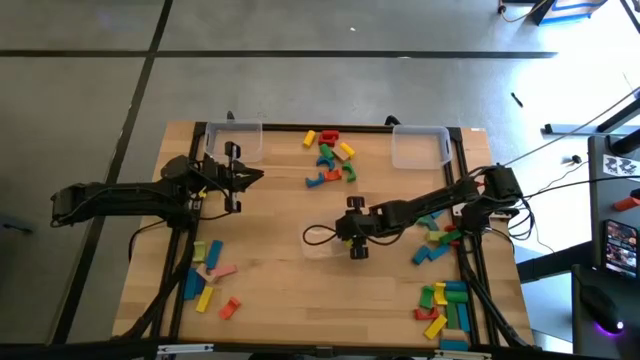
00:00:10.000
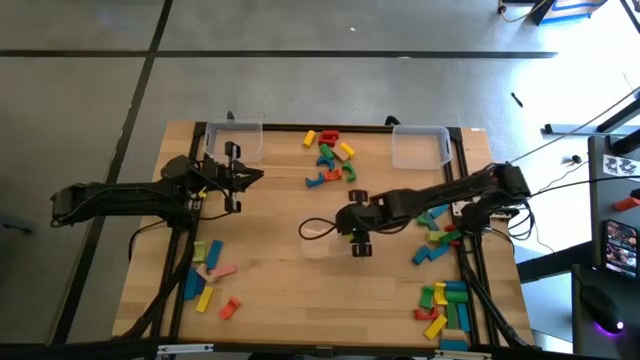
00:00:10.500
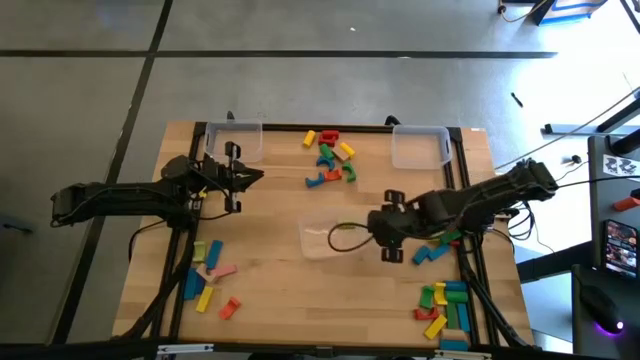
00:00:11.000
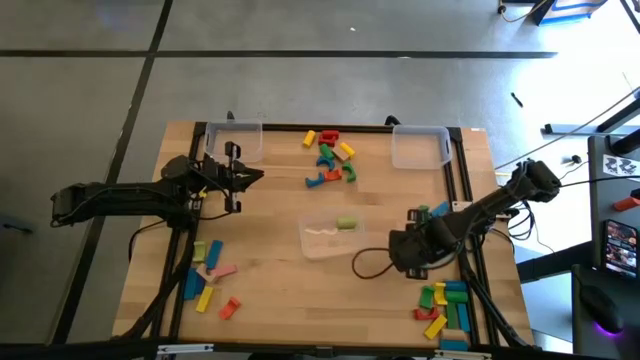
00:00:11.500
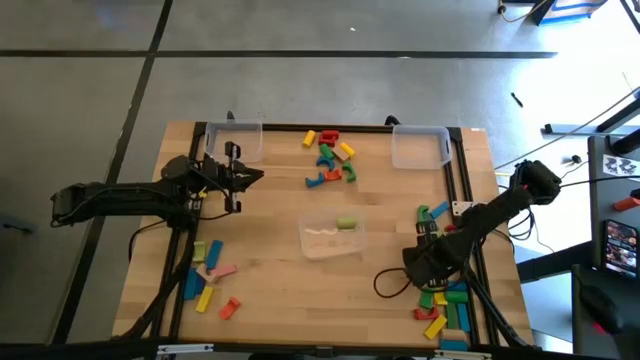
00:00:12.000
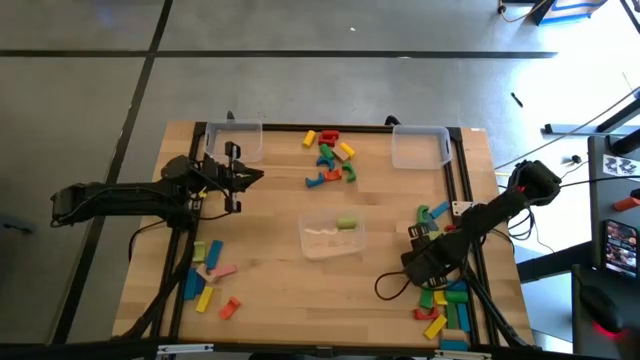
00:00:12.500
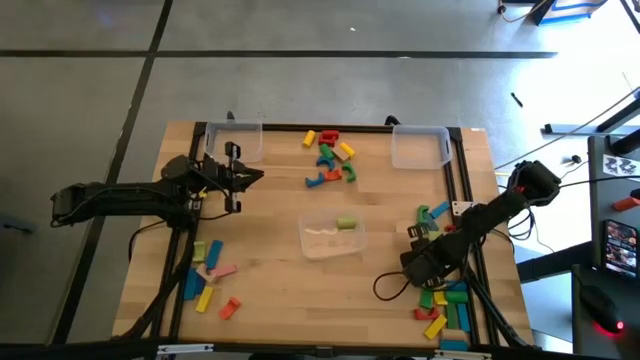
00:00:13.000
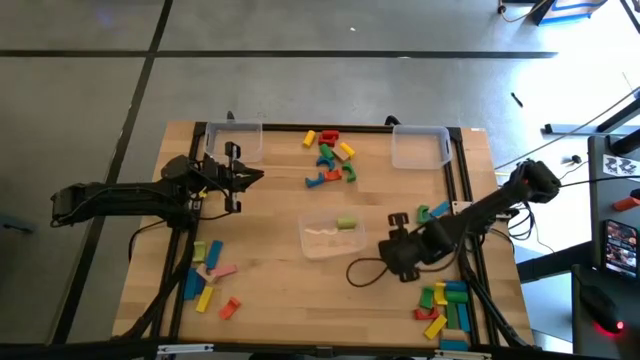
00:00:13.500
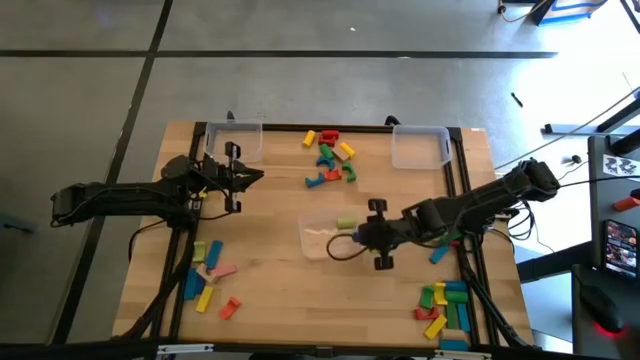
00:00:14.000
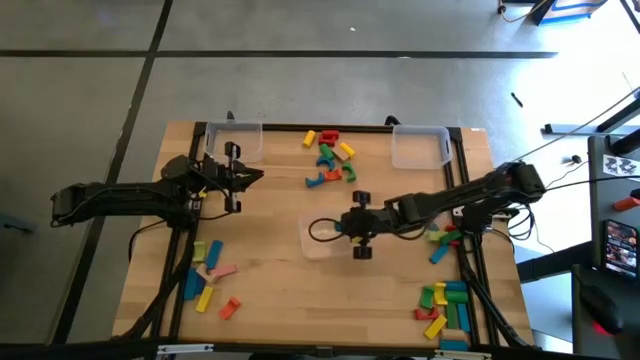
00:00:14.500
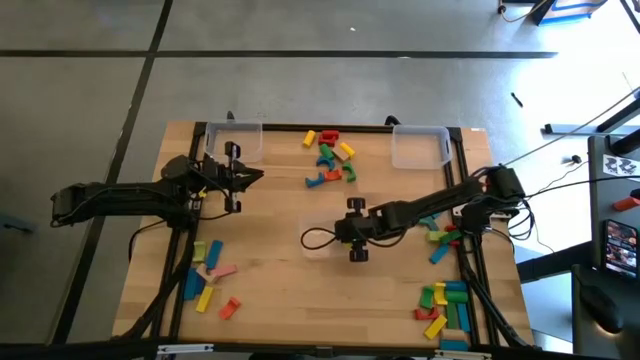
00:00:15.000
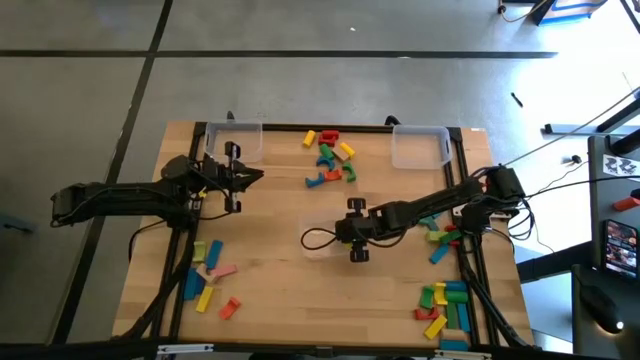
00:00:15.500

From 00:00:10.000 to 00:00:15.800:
Task: Sort blocks by size
Put the blue cylindrical block into the bottom transparent bin

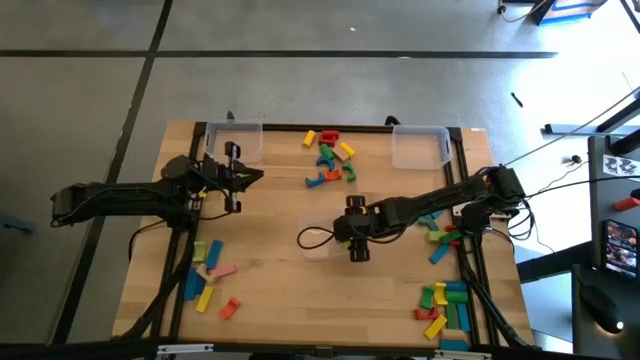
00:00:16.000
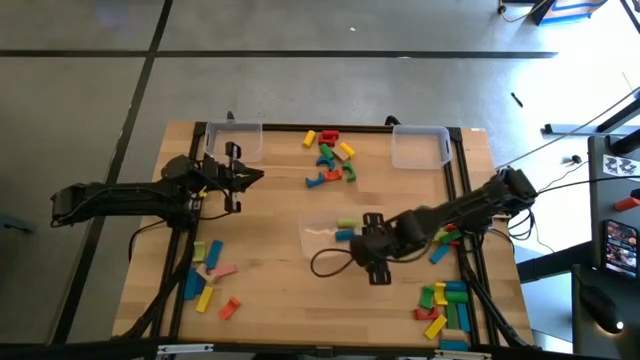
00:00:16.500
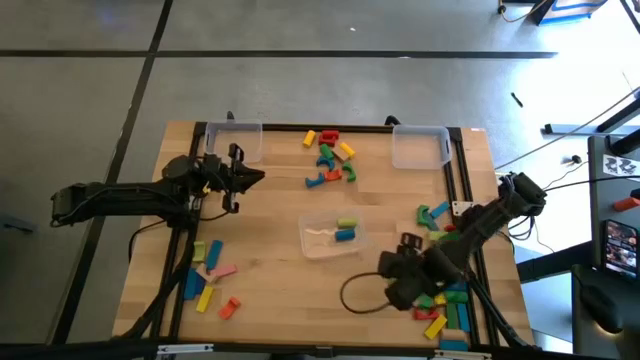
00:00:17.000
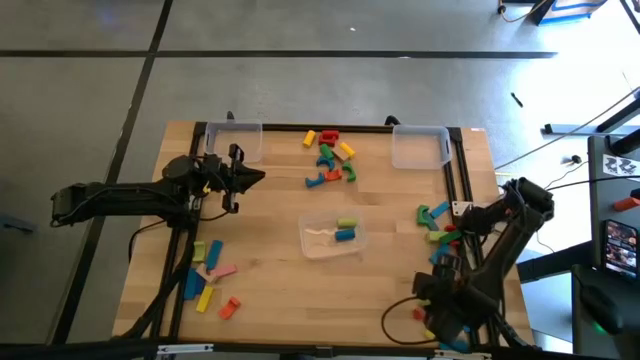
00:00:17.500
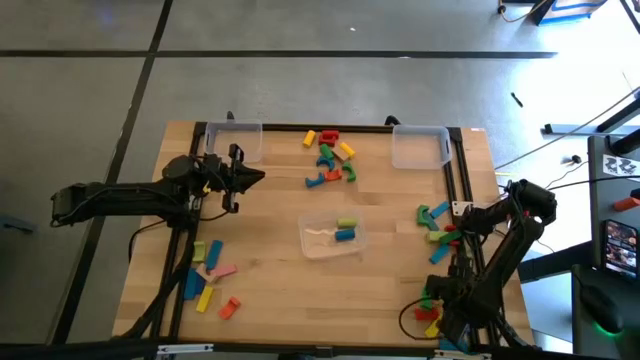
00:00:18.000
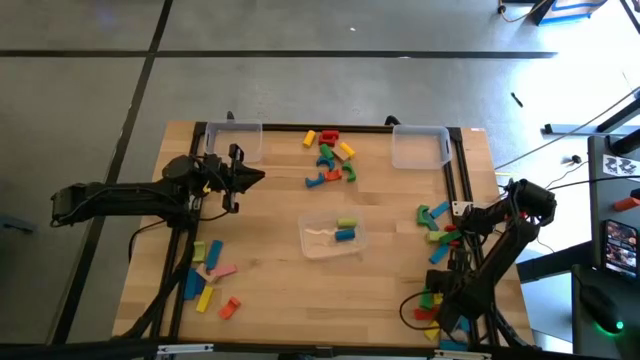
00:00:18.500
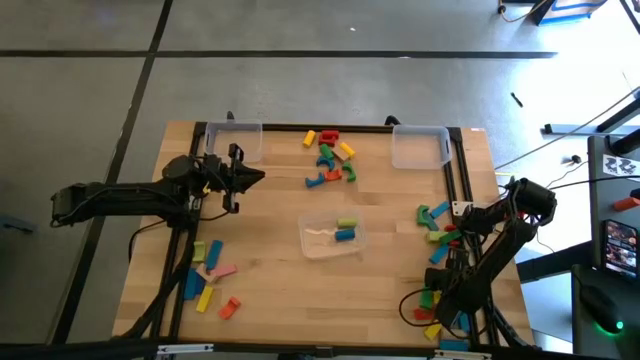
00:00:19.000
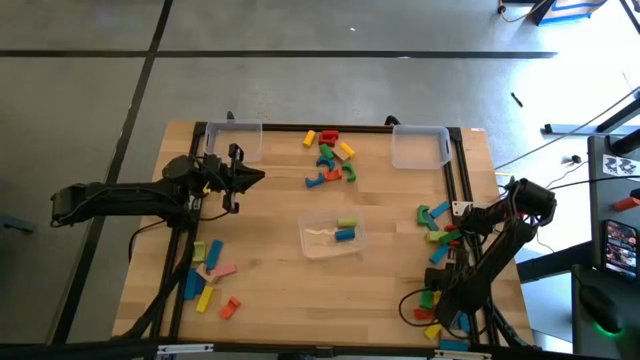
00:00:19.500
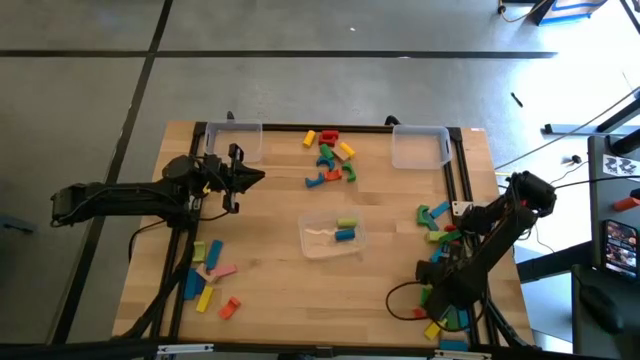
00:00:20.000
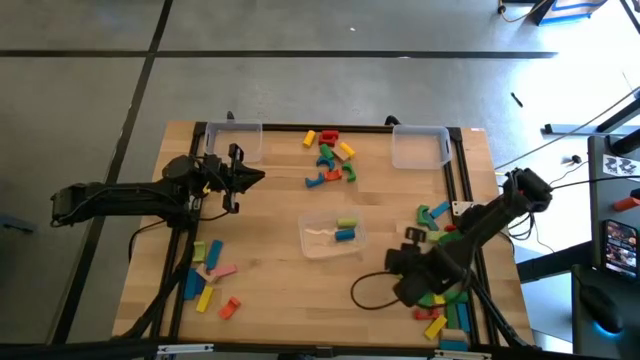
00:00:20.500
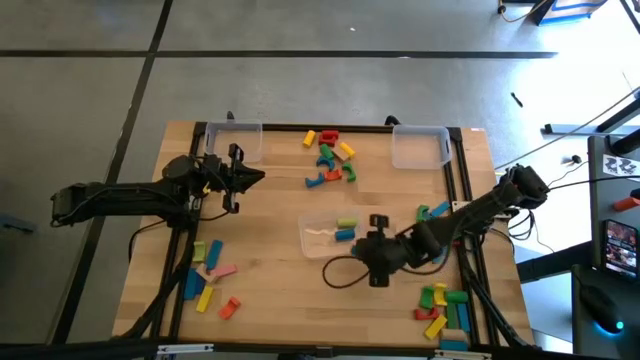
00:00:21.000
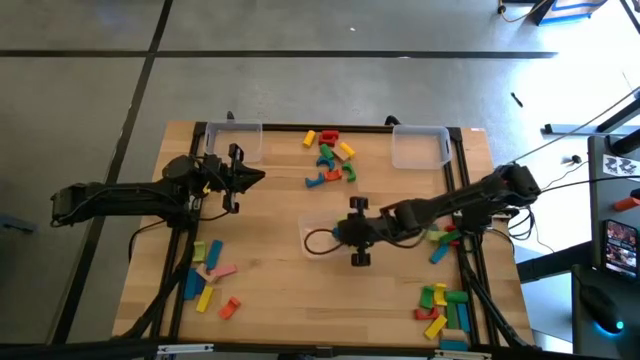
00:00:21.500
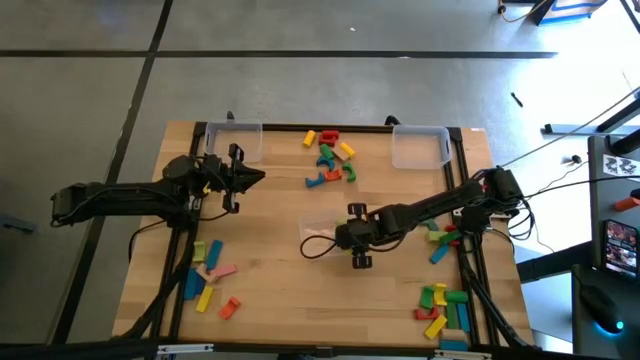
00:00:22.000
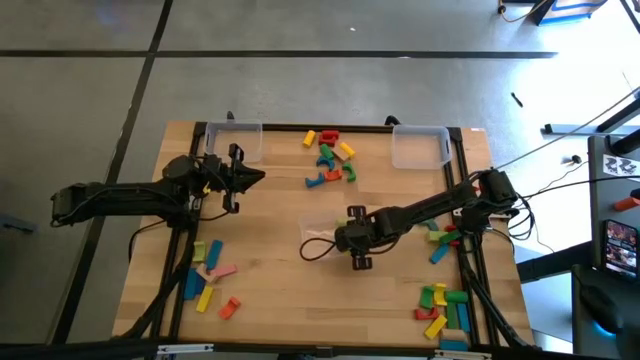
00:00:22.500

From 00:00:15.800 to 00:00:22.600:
Put the blue cylindrical block into the bottom transparent bin

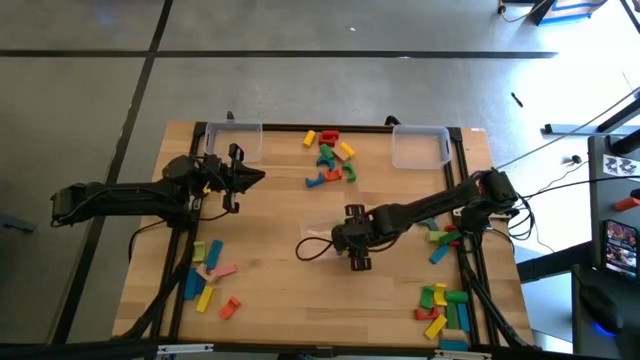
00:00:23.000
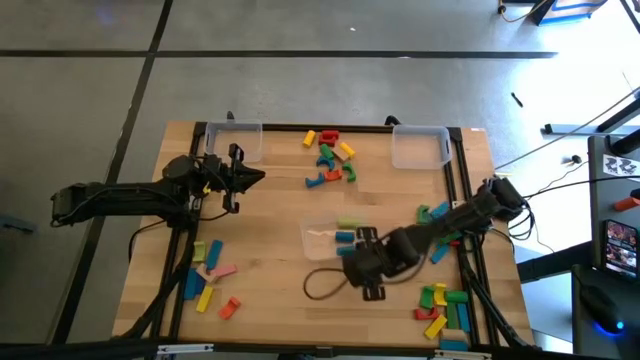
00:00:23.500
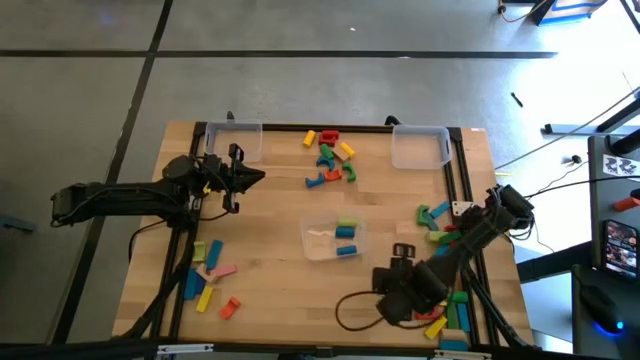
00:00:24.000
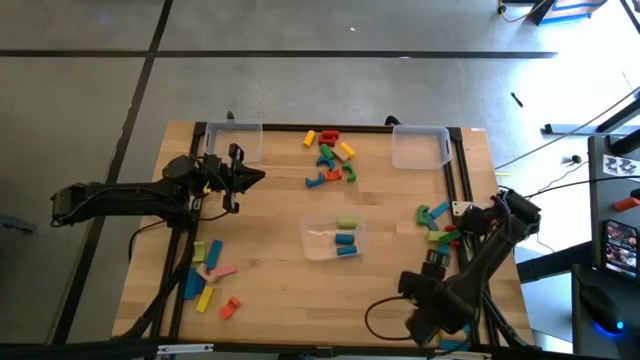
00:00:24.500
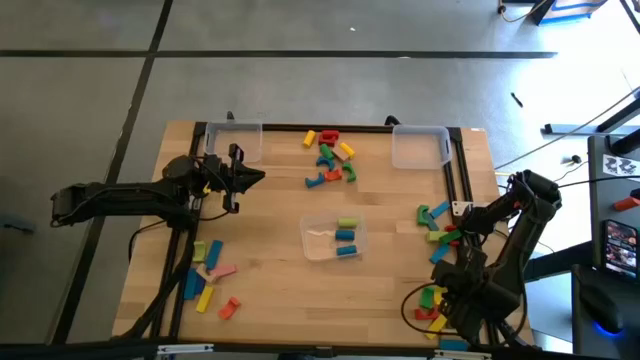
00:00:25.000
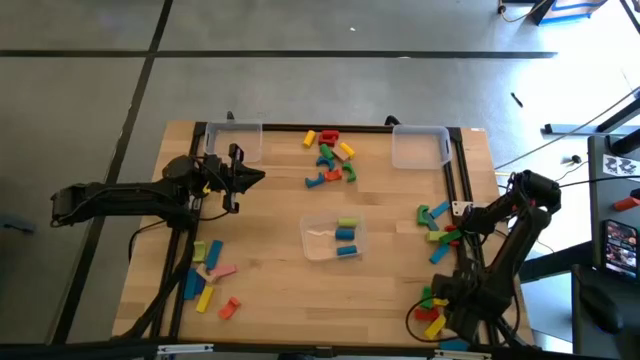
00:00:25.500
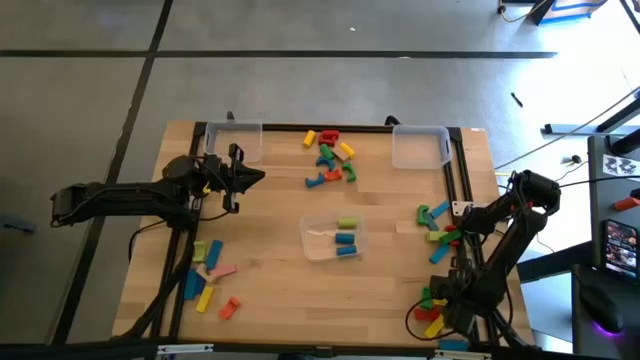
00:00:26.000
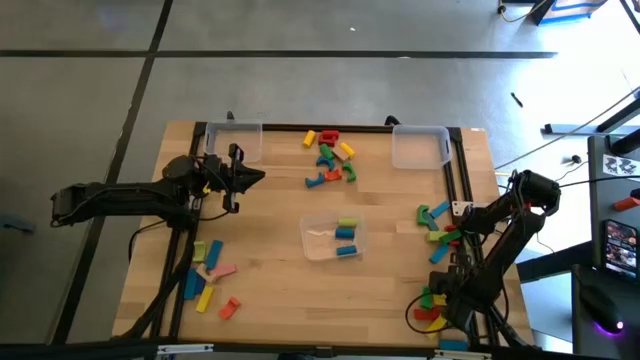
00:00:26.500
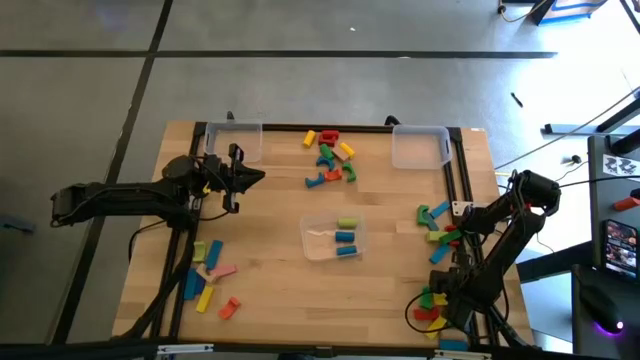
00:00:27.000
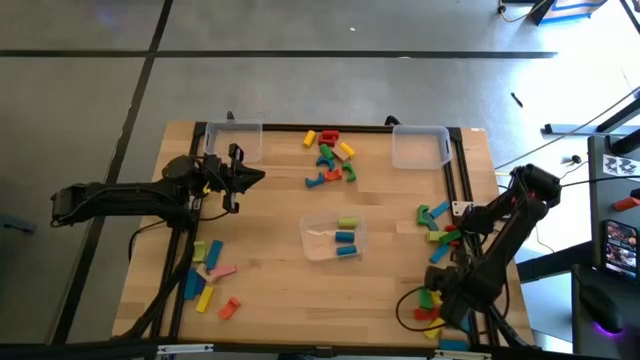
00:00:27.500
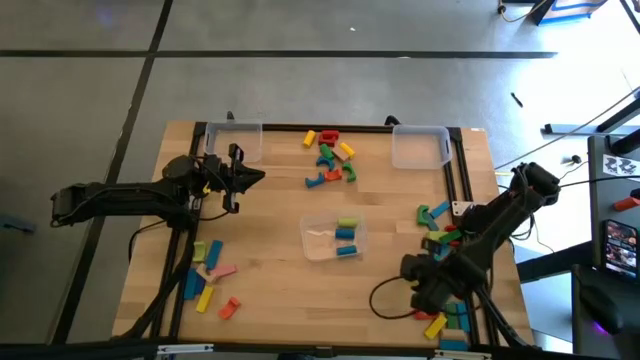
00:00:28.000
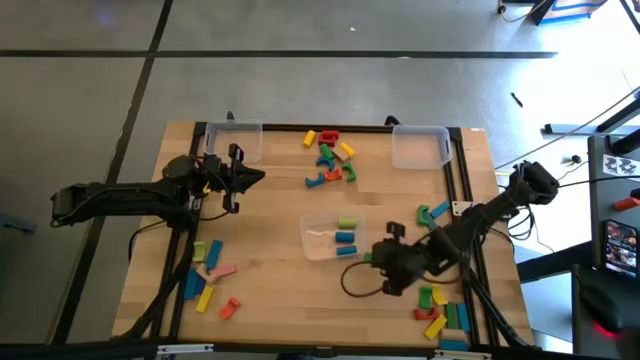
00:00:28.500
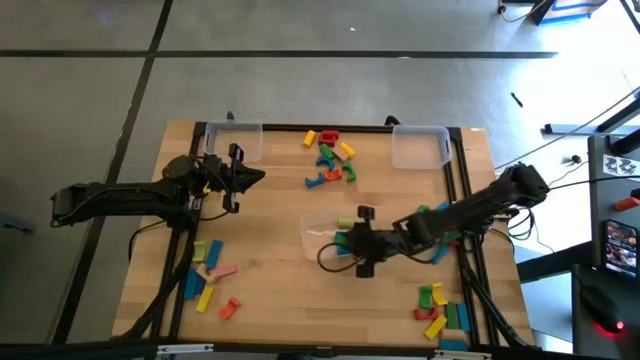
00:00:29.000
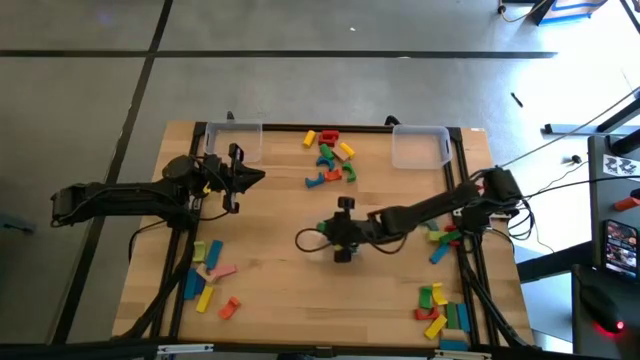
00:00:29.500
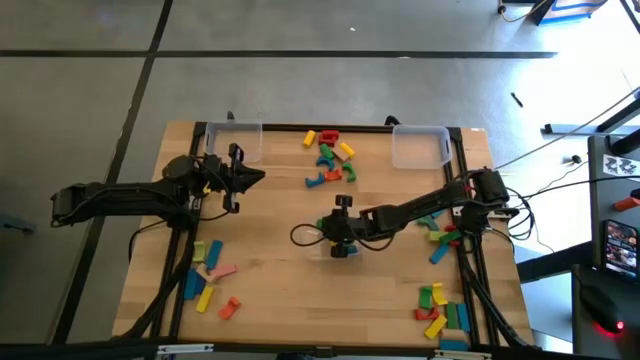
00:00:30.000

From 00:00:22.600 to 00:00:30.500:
Put the green cylindrical block into the bottom transparent bin
